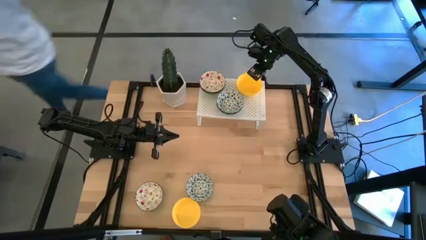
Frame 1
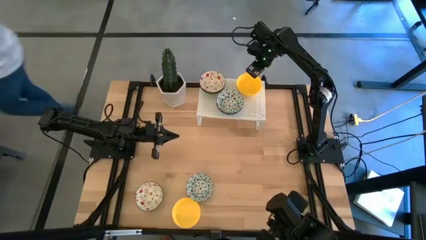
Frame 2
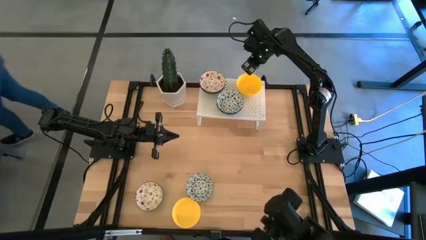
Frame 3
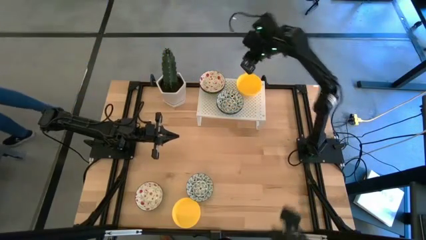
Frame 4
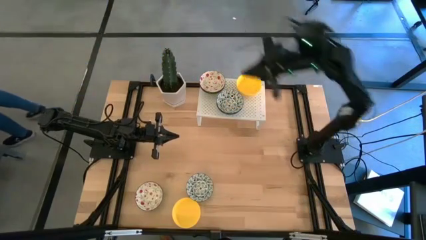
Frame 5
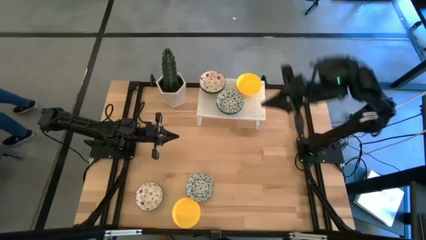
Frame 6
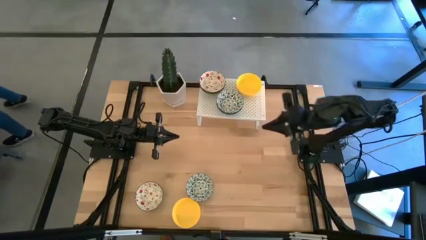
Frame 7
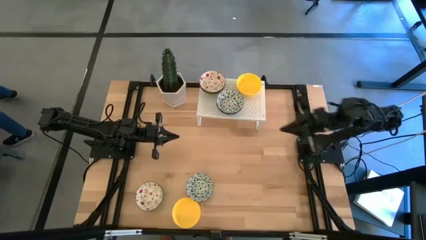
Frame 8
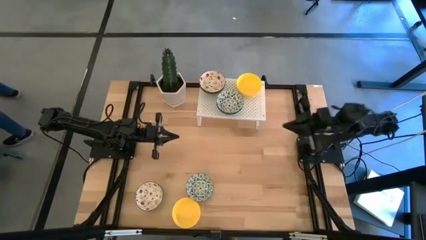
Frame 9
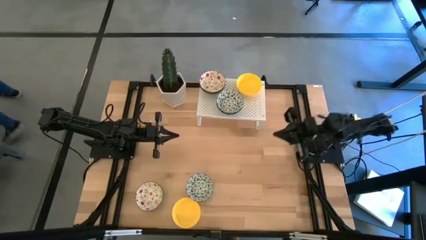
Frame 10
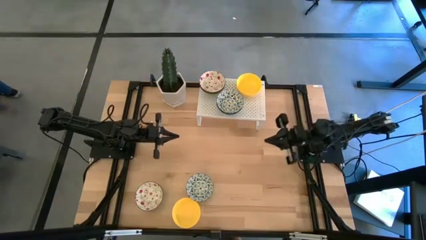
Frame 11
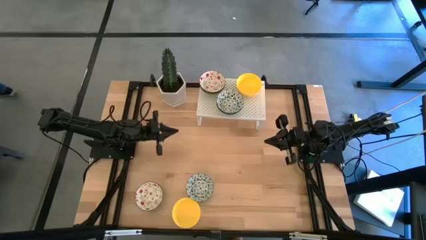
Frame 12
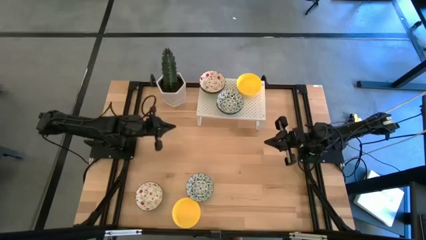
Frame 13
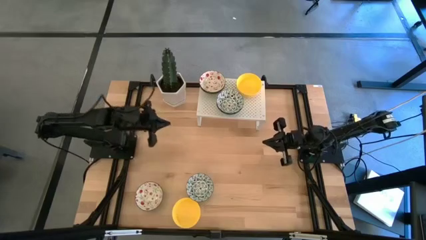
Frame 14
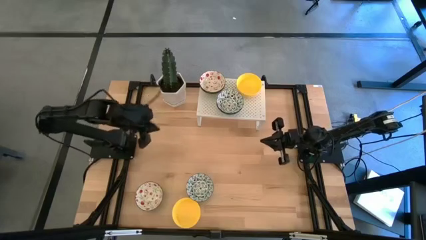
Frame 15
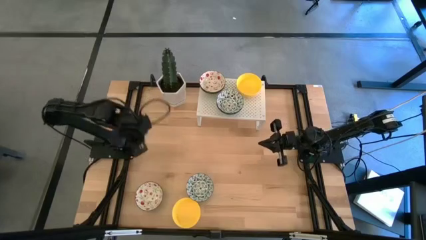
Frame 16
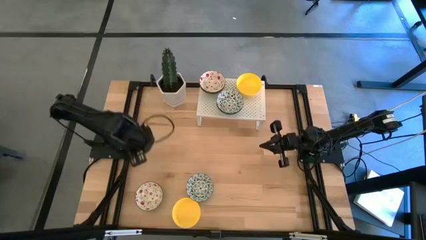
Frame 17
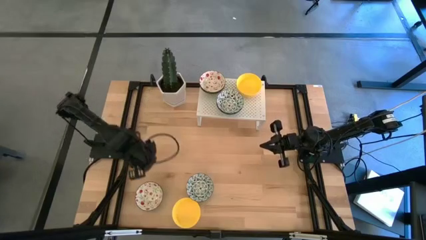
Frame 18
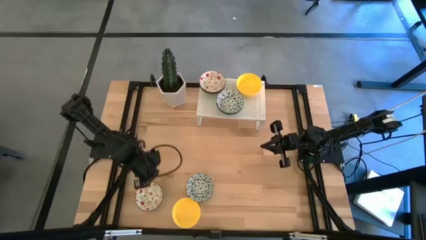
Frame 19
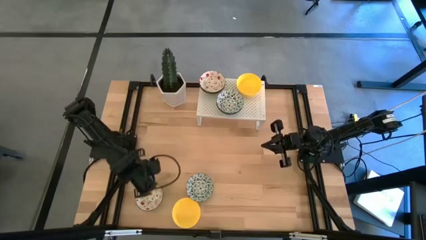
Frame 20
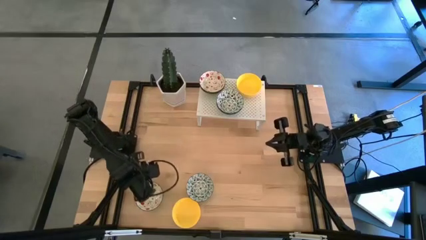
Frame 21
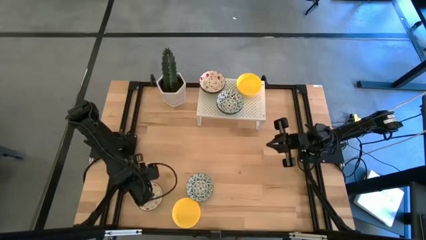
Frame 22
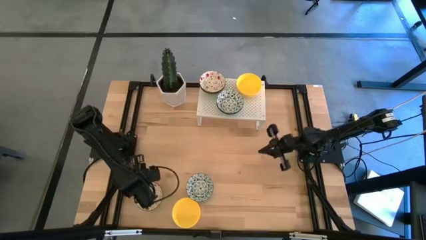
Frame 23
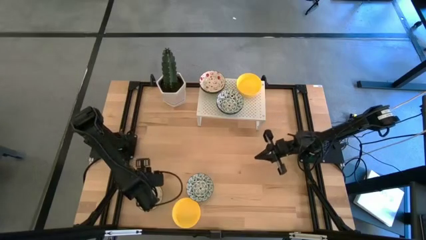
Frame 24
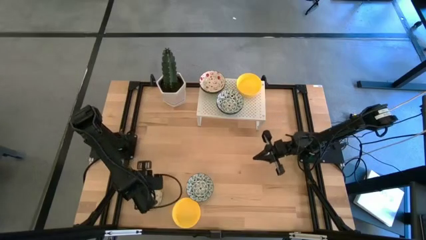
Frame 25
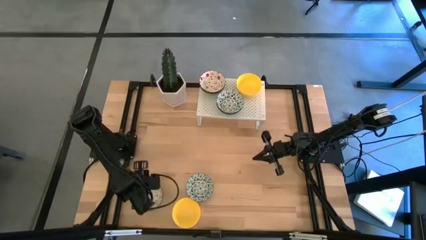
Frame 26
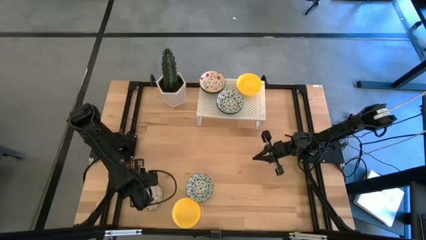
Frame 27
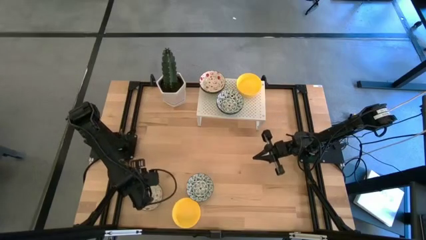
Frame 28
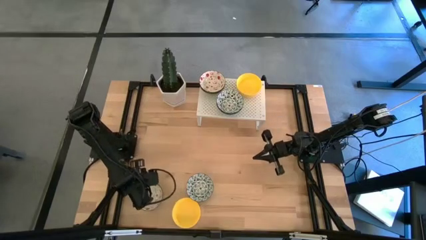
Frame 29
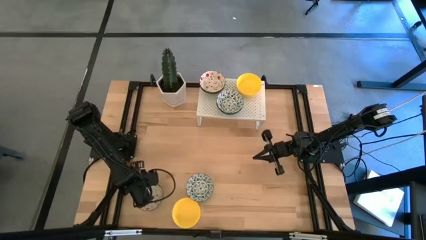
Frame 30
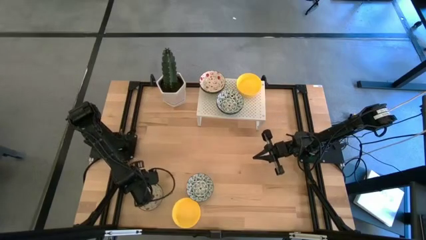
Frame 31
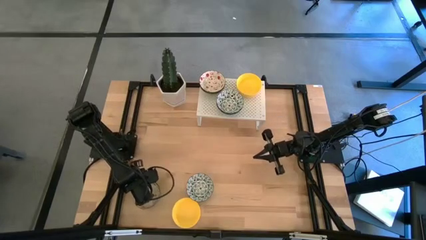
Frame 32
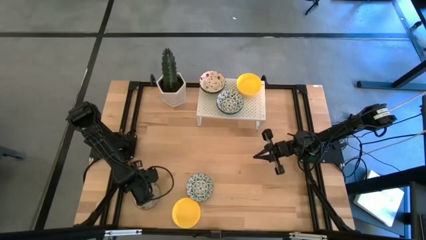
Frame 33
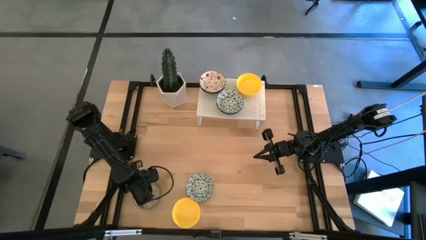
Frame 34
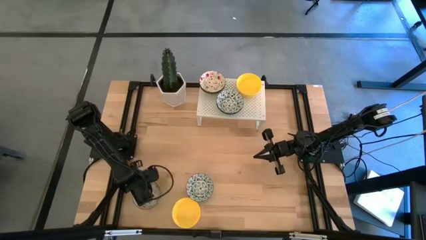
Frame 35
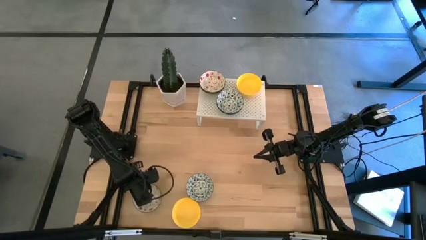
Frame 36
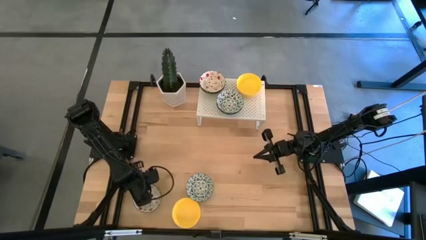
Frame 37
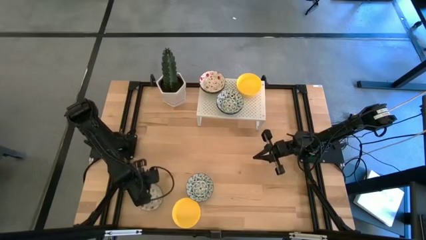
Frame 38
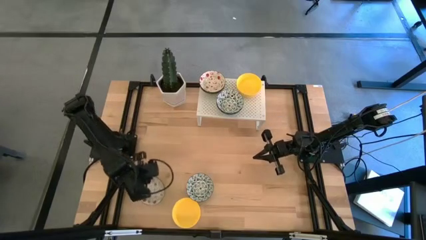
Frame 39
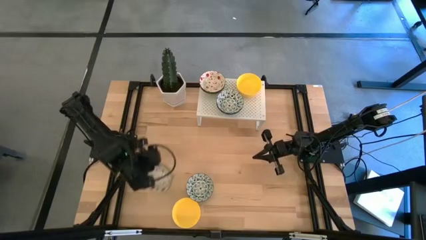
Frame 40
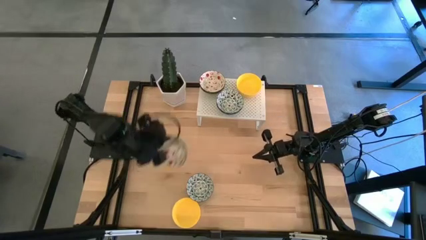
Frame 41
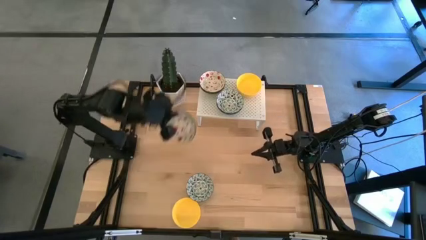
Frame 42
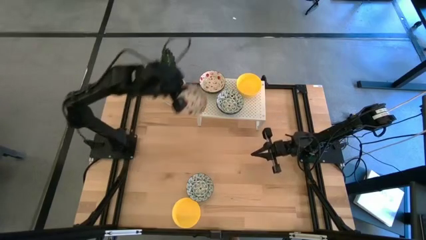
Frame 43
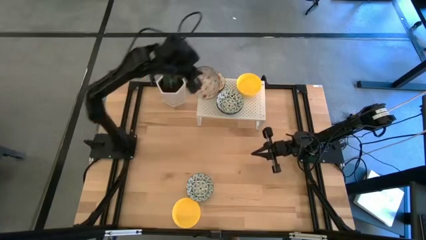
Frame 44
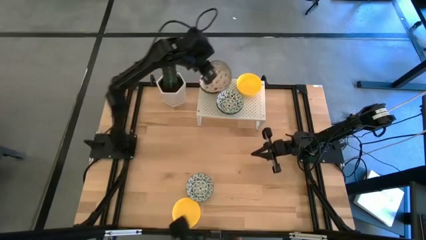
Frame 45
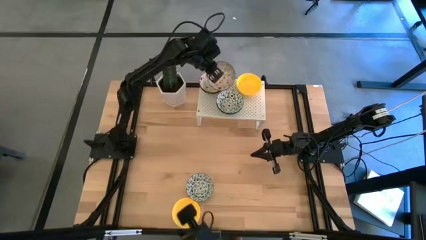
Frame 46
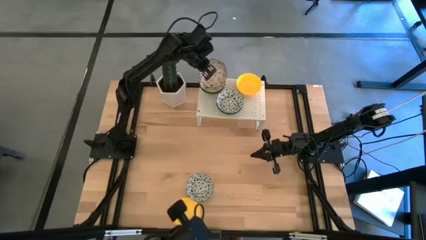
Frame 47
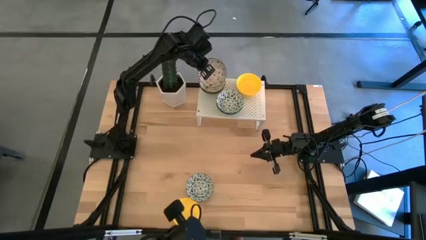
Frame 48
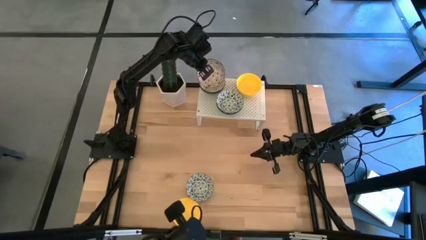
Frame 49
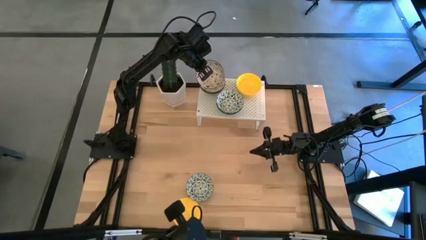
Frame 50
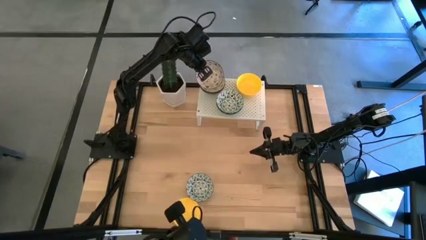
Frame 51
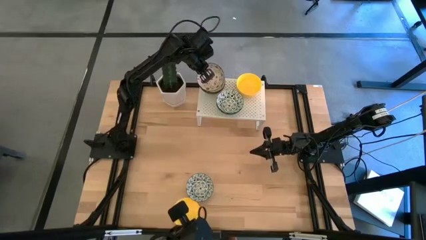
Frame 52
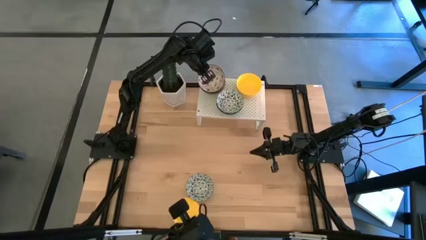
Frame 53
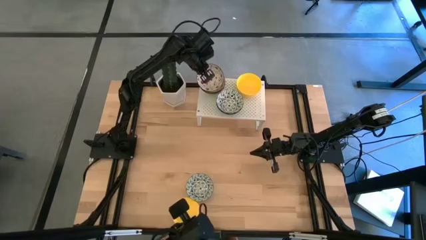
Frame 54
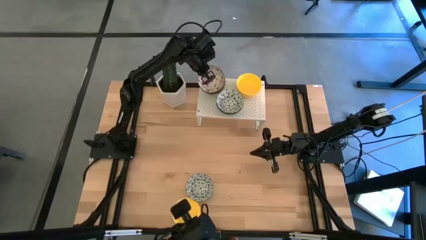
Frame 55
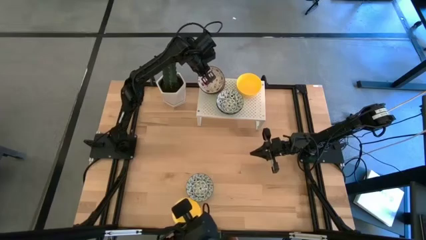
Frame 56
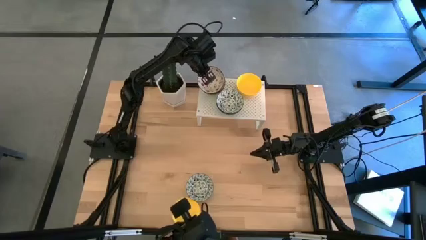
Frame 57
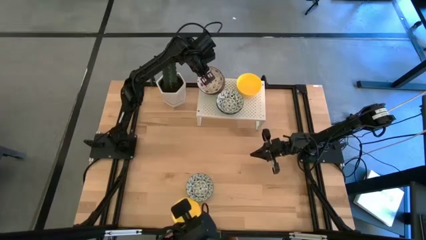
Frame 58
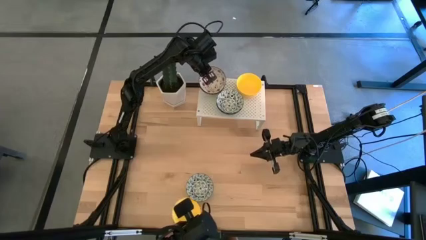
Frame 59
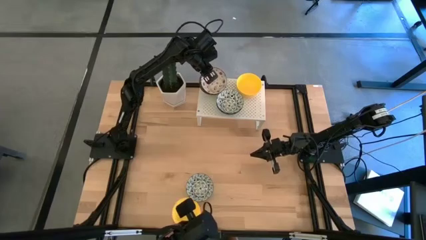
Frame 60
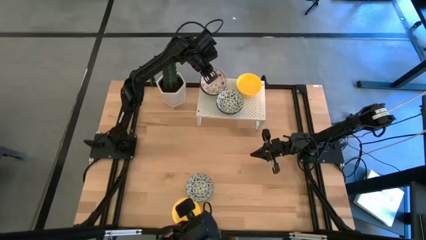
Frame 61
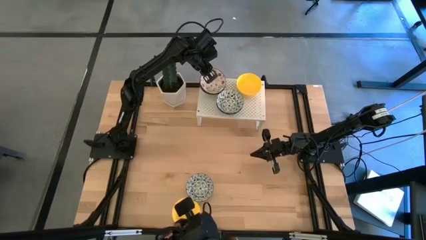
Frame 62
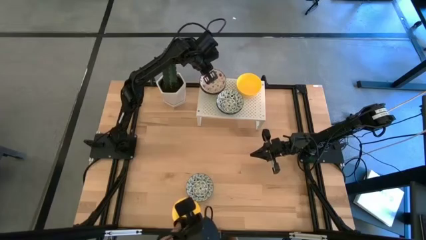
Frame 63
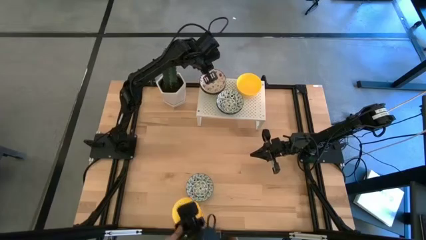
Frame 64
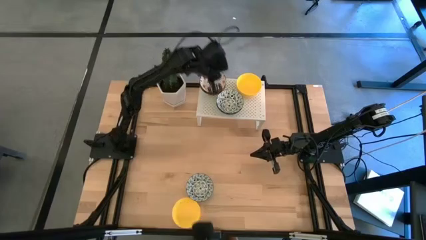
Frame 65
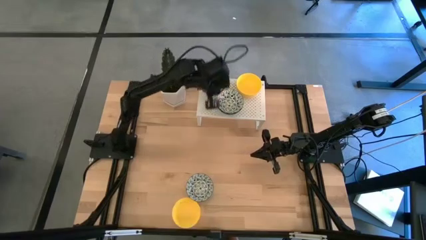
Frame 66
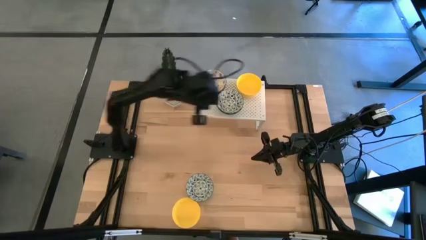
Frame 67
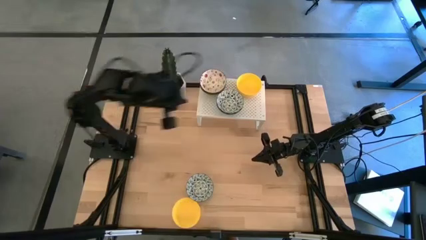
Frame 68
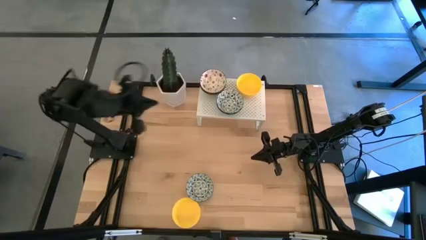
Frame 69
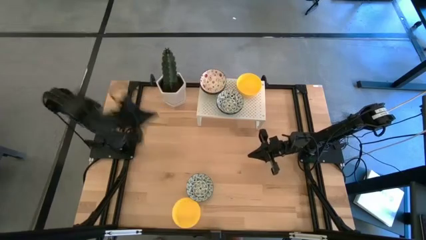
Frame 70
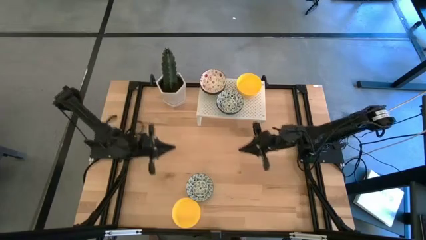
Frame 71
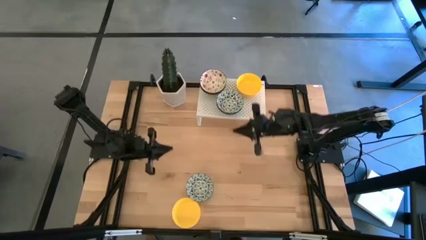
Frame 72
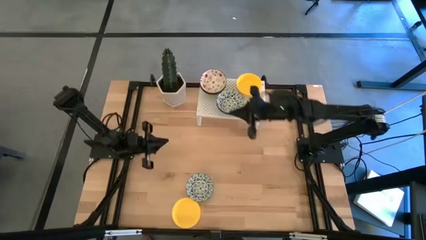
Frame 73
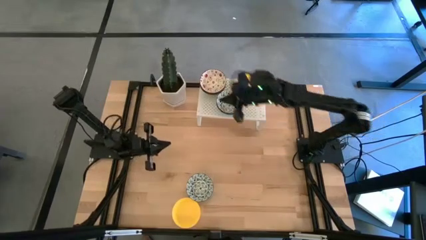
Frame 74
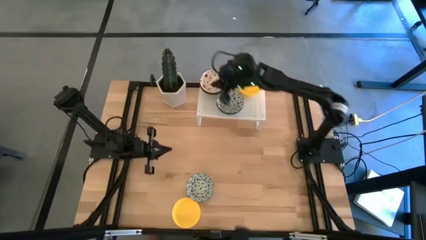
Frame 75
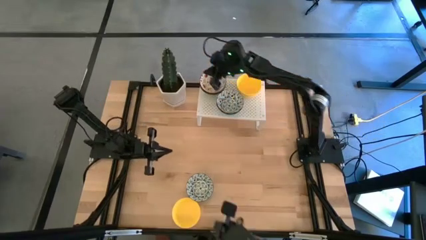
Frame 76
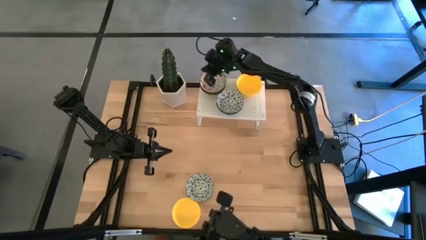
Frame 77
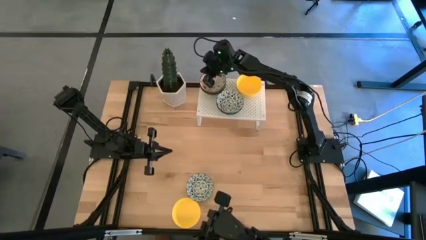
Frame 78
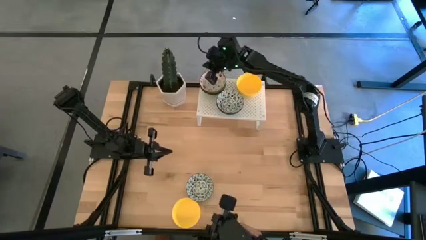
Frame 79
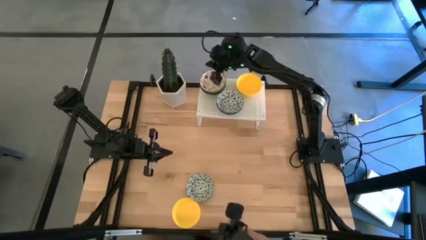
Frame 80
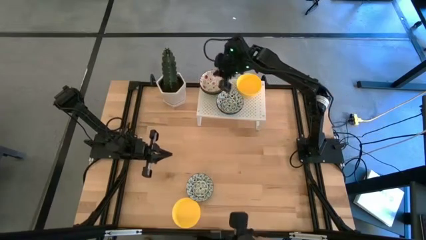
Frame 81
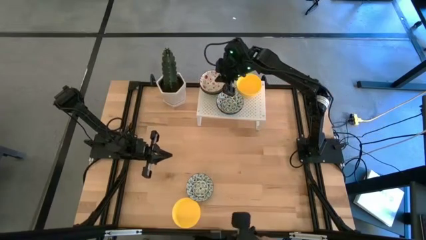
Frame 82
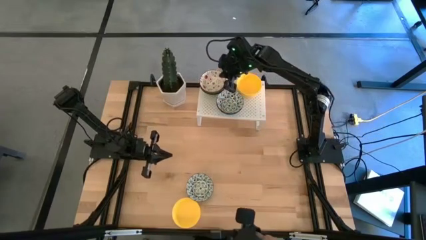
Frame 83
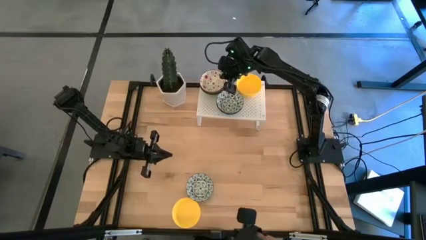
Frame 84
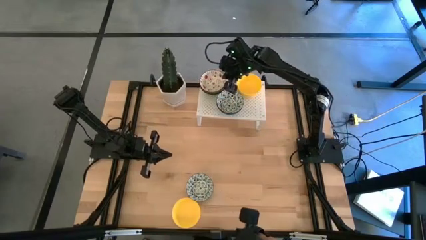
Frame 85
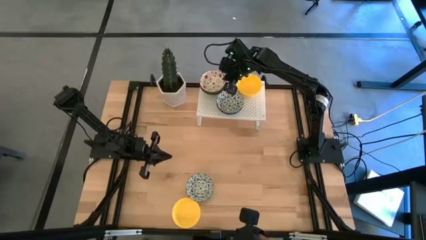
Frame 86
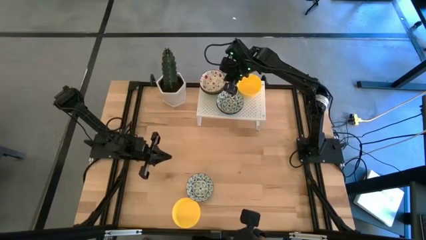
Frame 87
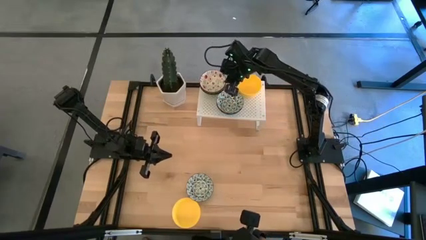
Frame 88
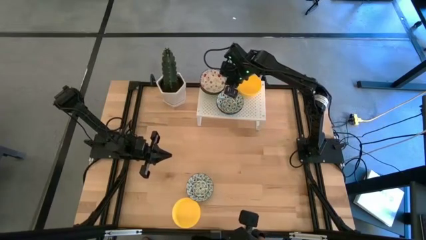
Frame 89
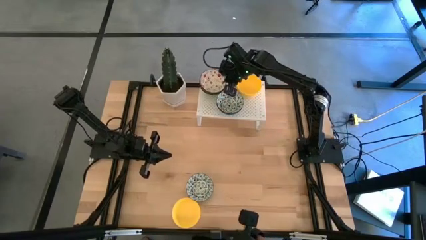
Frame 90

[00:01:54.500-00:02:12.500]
Task: Pick & Place Mini bowls
Stack the red patterned bowl on the red patterned bowls on the shelf
